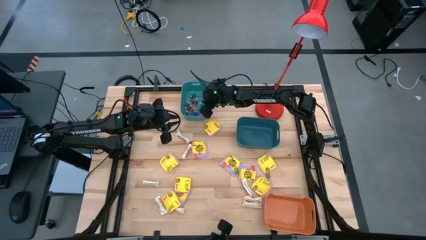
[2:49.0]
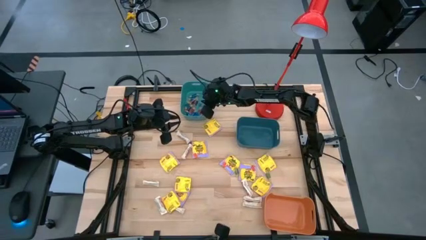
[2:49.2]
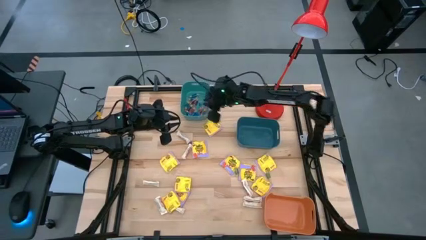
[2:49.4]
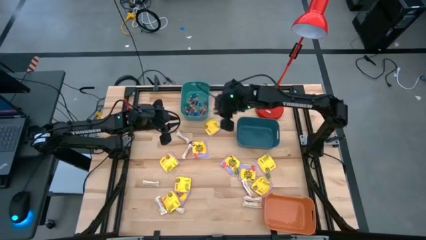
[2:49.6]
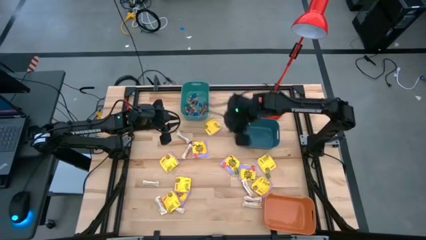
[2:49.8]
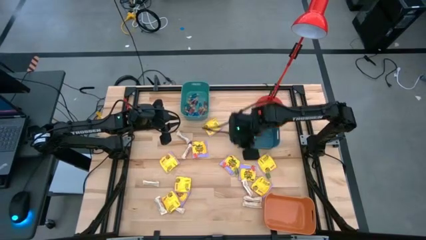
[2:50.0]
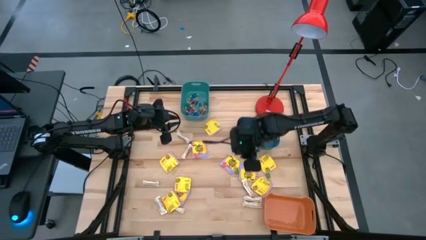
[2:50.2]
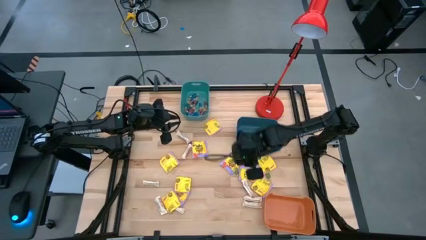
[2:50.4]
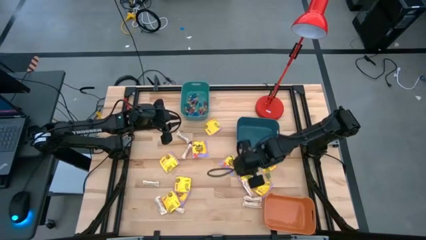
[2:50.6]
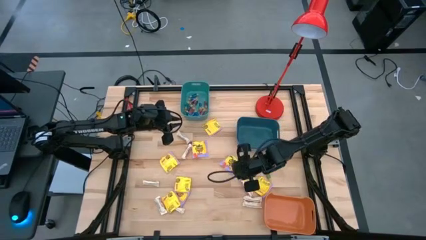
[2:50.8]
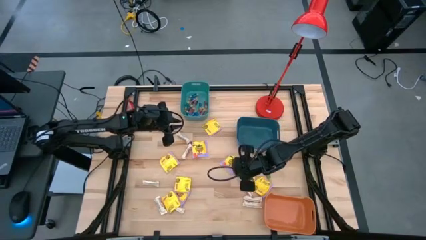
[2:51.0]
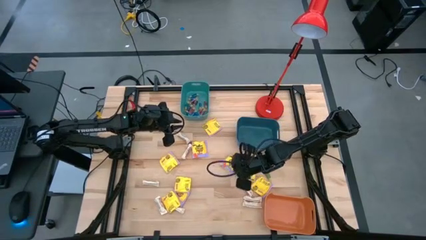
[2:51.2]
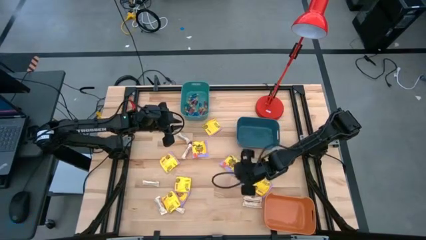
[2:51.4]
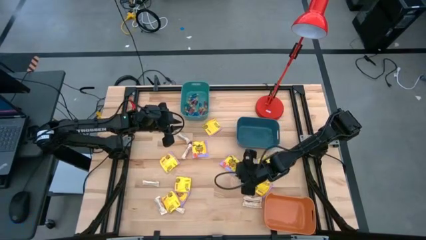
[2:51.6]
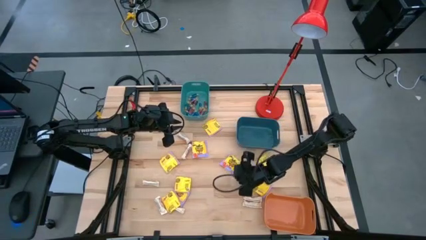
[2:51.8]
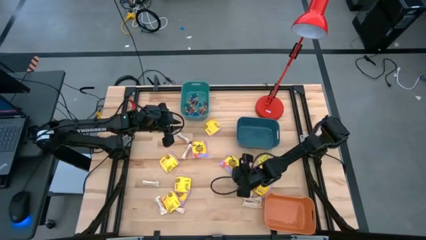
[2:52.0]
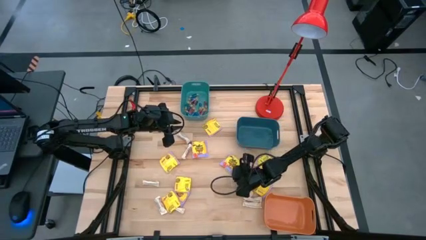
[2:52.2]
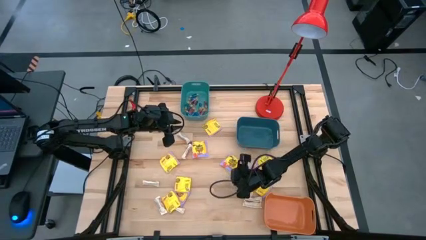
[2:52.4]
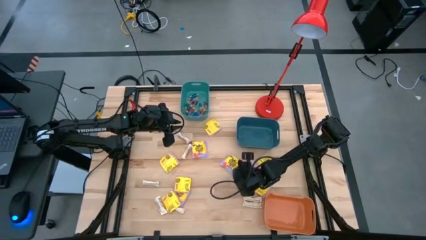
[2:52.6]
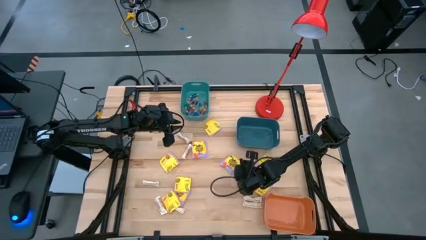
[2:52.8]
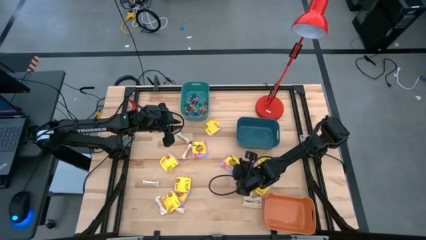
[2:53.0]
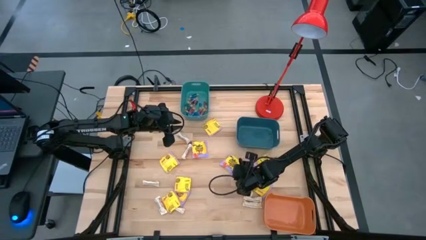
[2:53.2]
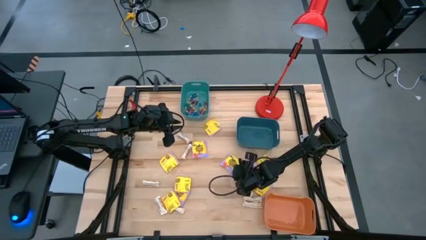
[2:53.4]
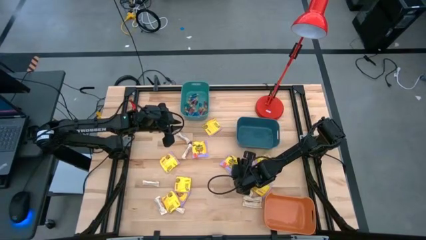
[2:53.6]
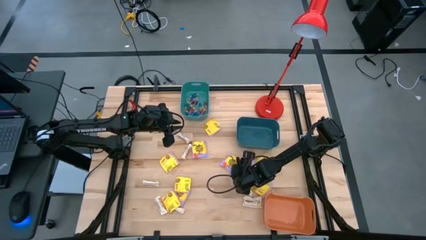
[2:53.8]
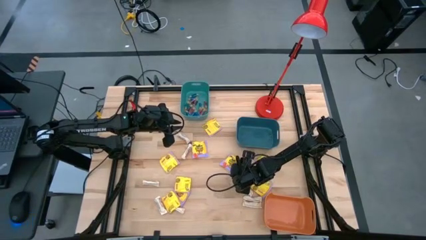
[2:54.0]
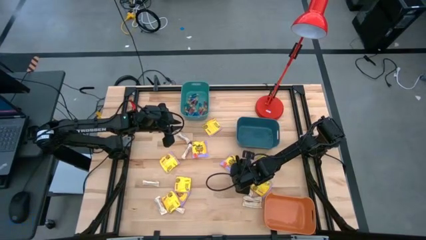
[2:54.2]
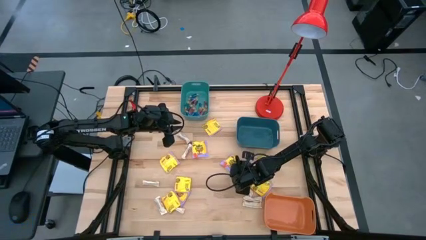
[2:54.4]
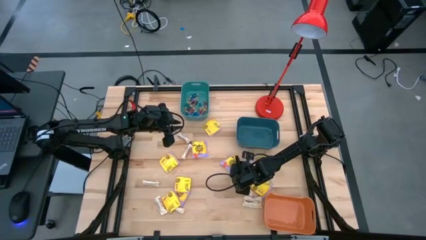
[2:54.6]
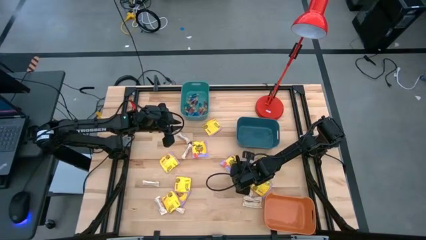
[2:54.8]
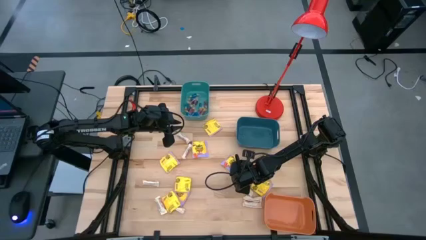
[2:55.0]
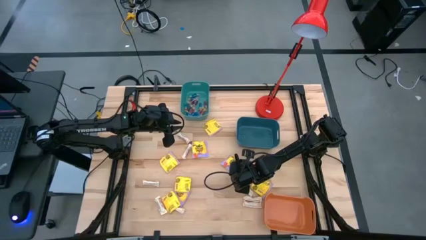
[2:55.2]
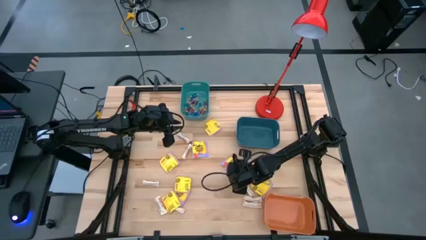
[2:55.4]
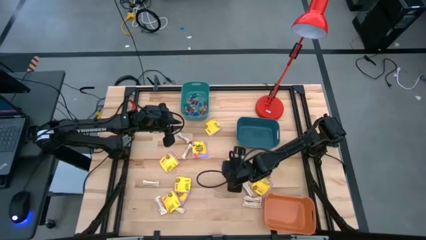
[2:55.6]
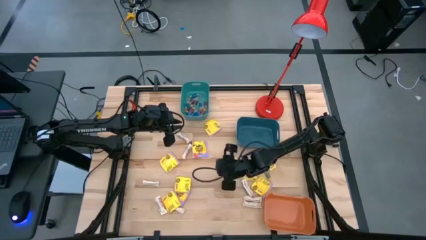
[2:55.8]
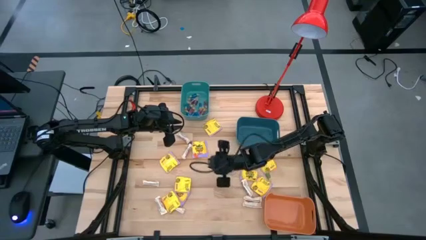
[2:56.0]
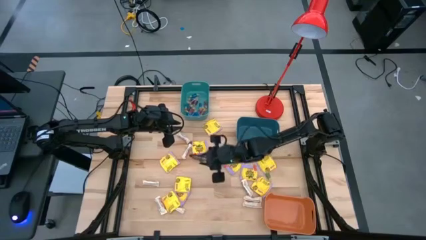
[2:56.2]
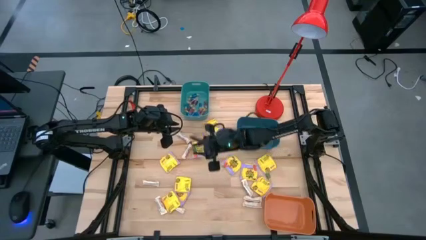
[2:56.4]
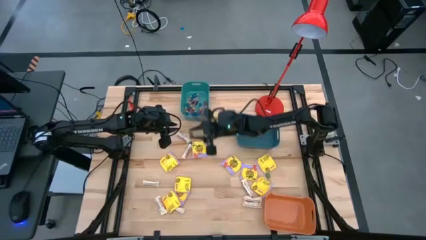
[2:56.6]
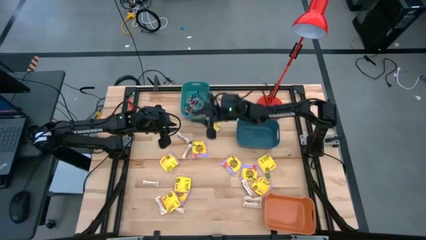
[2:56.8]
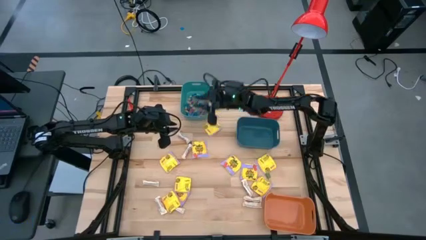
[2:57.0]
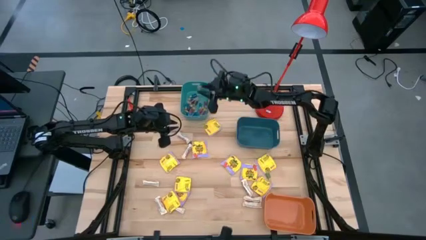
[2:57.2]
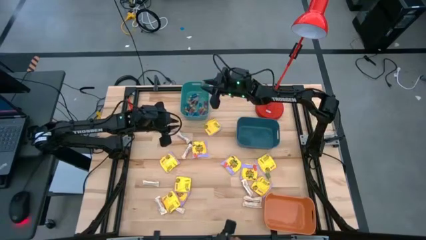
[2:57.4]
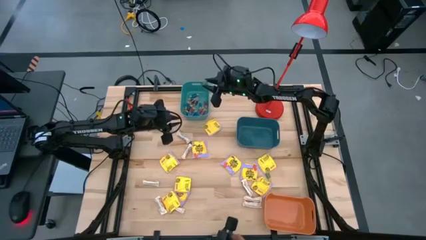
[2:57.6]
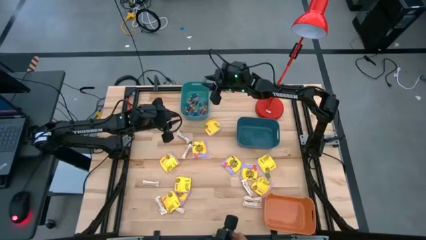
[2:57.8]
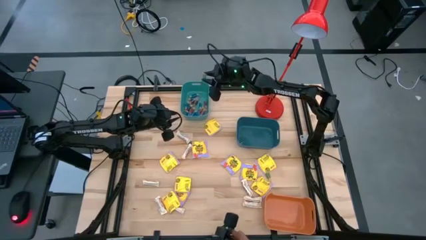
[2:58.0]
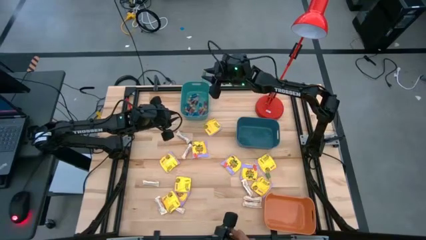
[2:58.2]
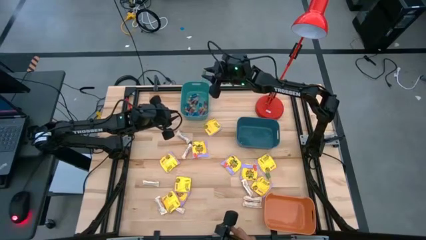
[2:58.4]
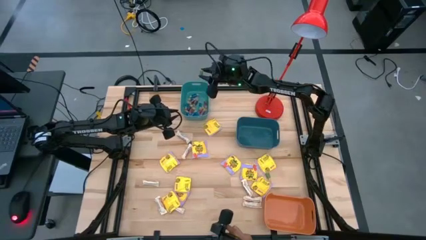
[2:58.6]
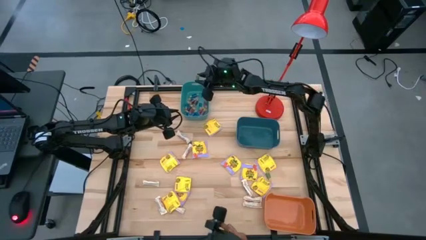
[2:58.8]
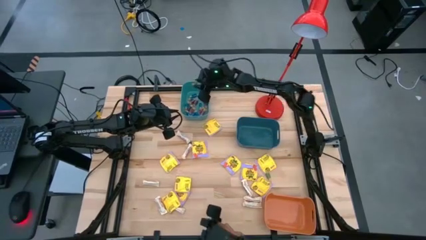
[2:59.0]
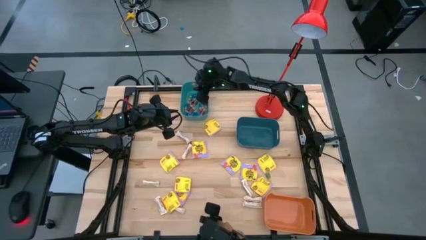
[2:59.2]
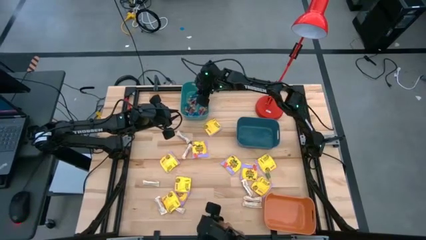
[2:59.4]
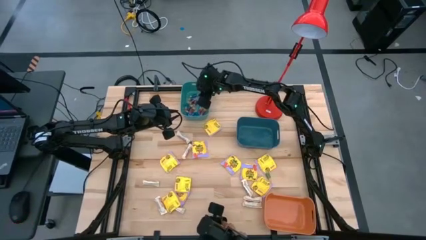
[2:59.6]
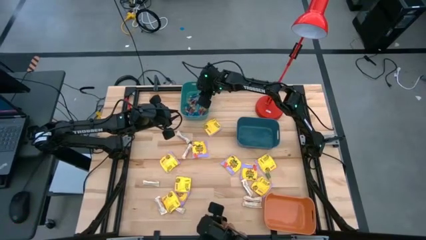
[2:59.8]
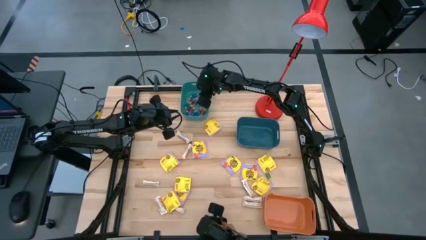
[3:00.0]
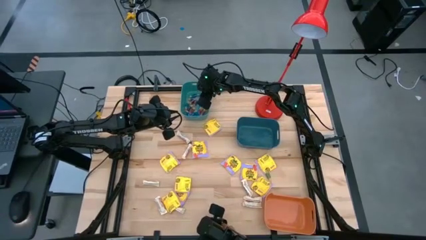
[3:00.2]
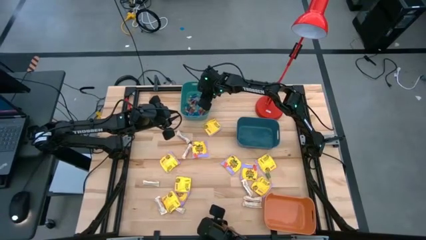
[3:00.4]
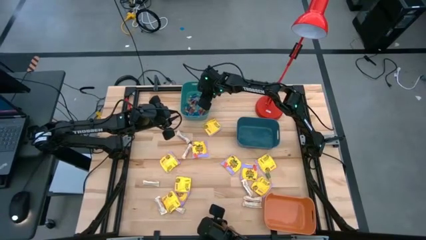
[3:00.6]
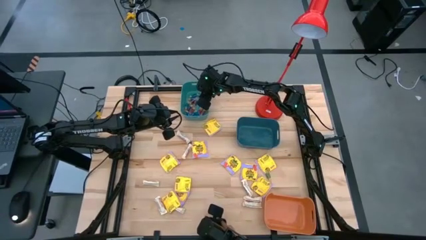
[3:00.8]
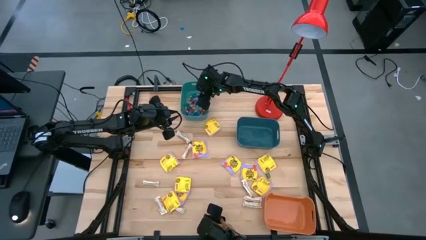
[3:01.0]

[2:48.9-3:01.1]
Task: Sort candy
Put the green candy into the green bin

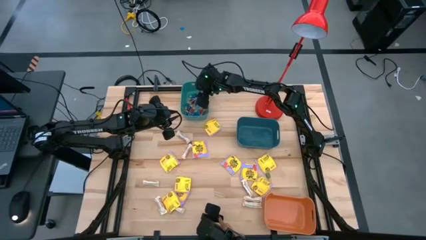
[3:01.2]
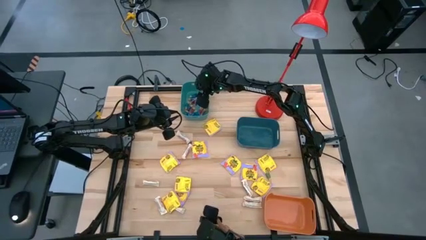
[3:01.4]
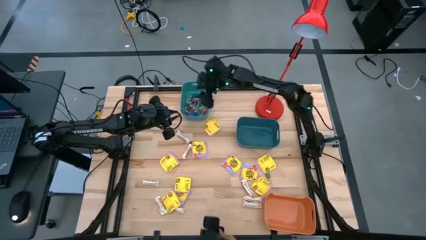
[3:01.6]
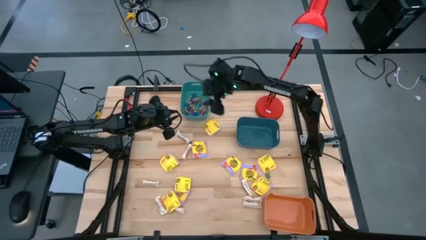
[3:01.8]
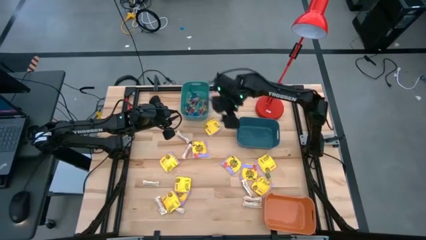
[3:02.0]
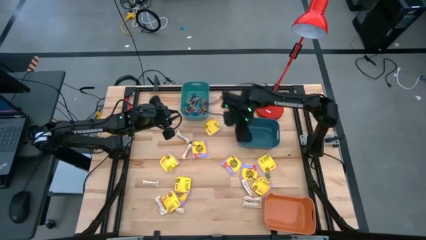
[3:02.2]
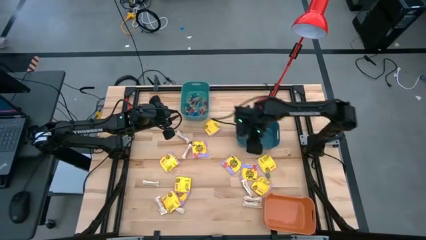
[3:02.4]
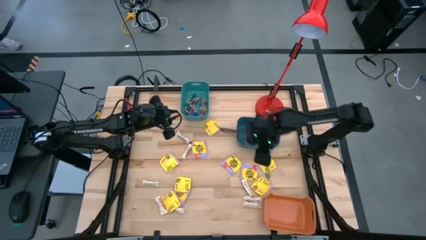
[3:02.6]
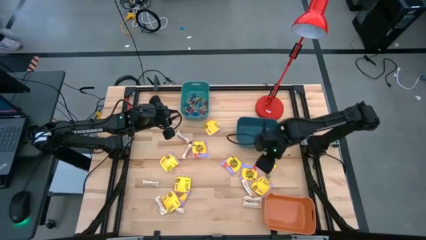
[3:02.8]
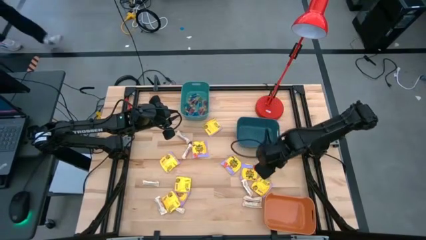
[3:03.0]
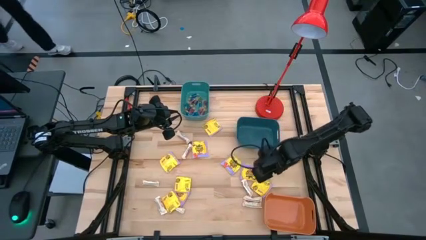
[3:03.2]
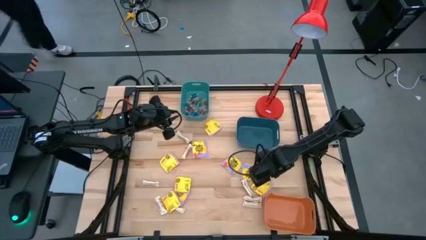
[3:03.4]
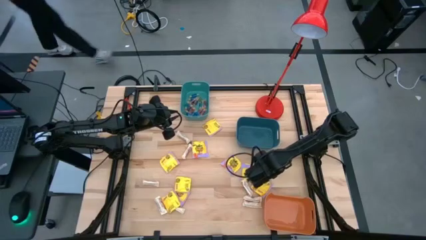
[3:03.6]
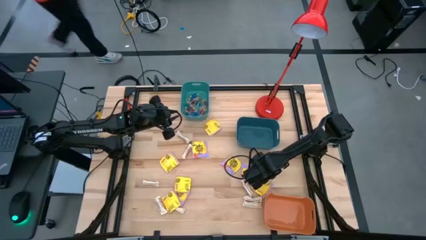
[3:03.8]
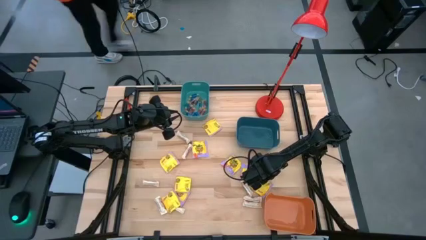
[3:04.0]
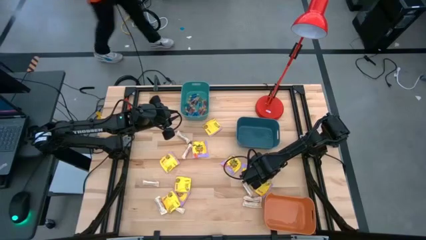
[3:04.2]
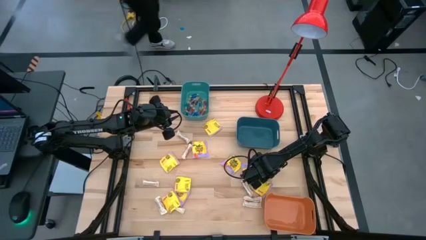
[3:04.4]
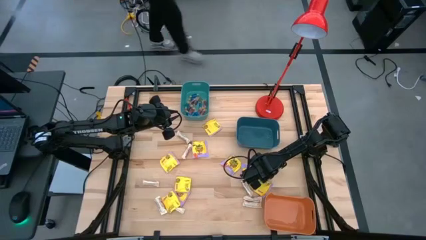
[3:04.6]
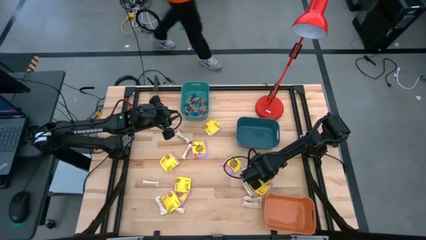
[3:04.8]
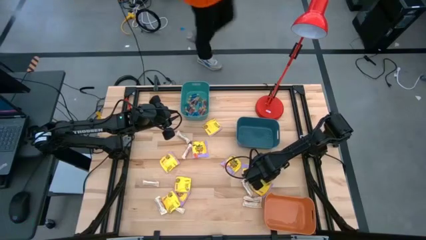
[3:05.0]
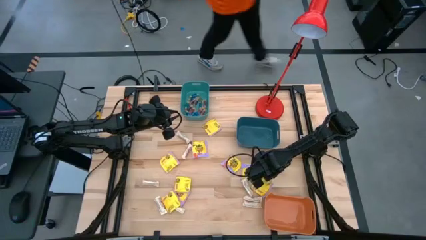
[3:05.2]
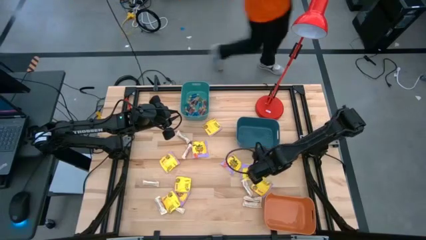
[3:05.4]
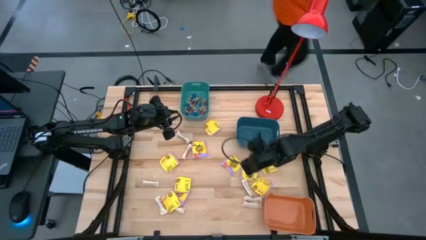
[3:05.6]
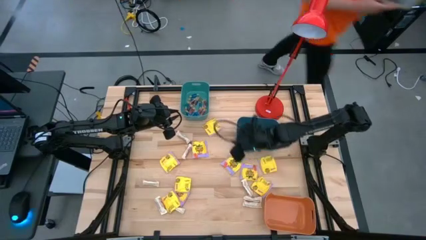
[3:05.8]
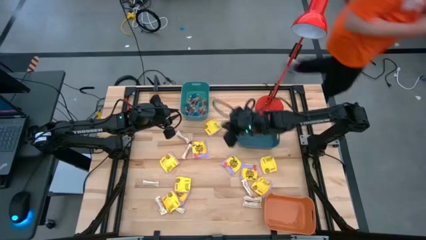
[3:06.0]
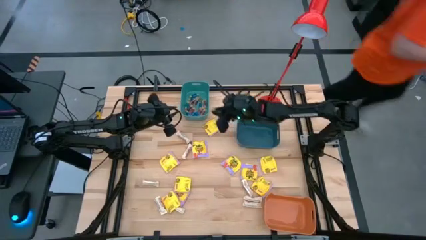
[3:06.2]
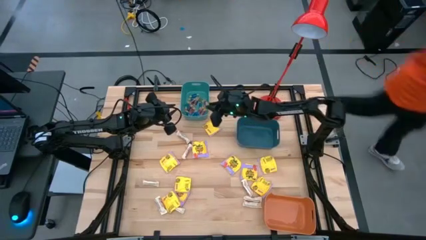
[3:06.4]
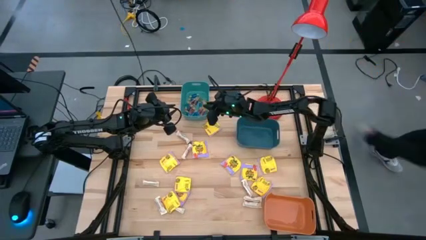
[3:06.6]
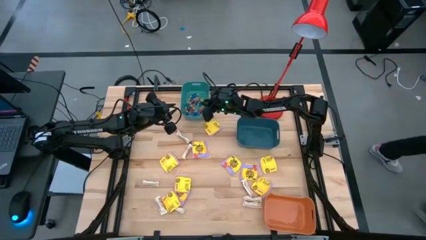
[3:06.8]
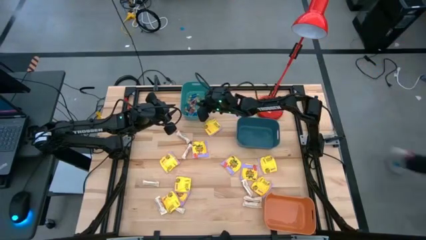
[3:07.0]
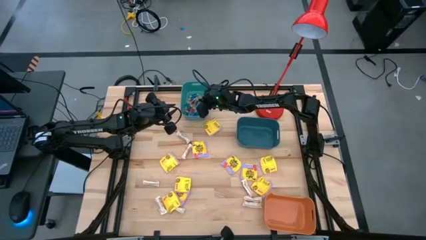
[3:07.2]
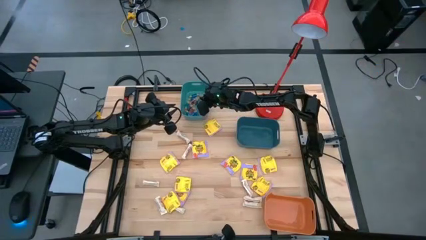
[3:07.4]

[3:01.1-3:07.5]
Put the green candy into the green bin
